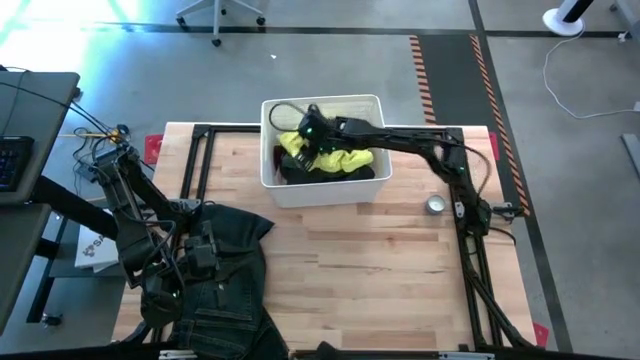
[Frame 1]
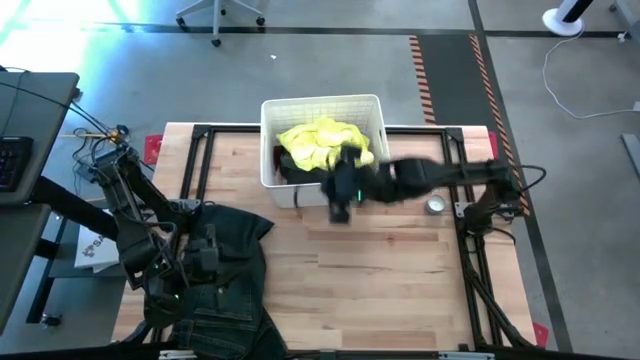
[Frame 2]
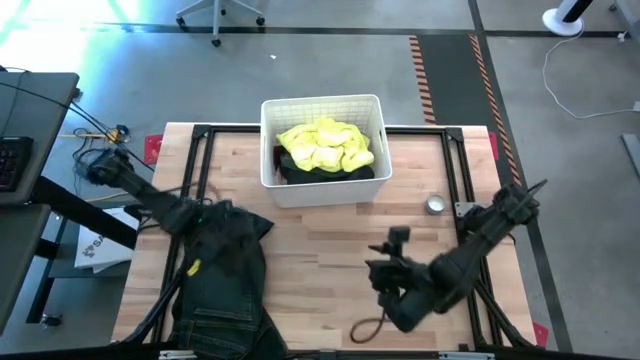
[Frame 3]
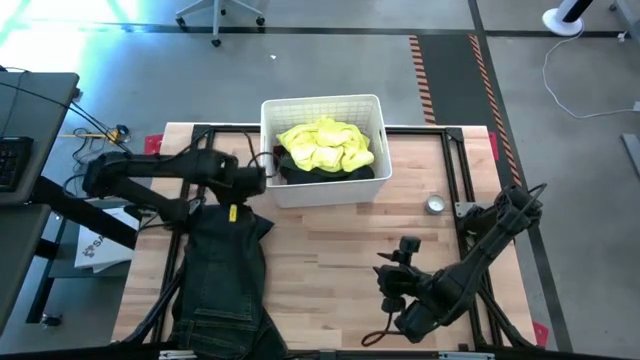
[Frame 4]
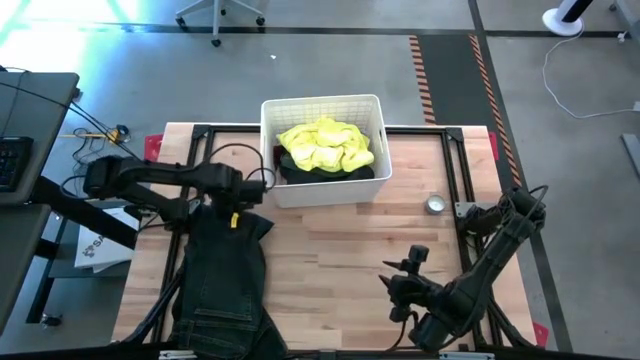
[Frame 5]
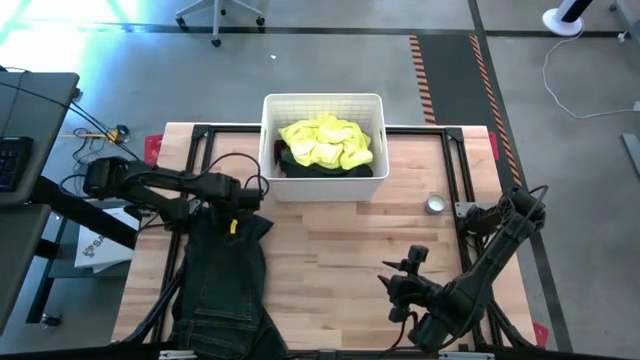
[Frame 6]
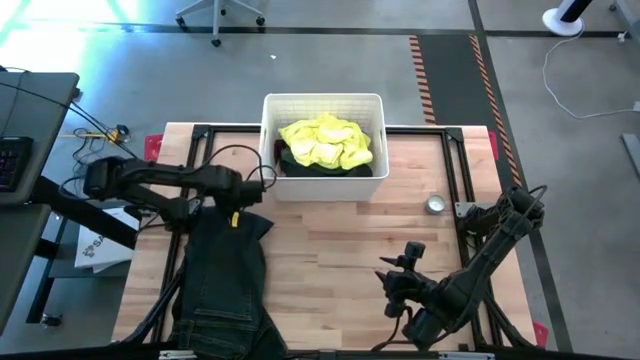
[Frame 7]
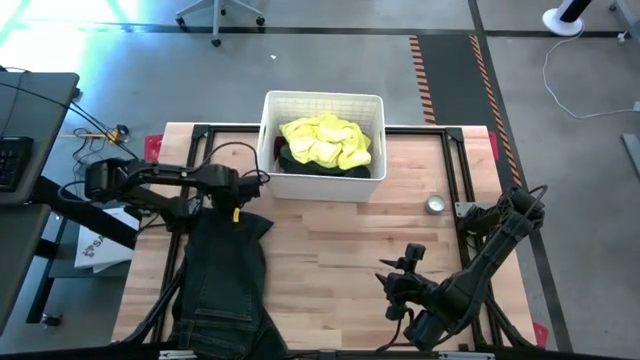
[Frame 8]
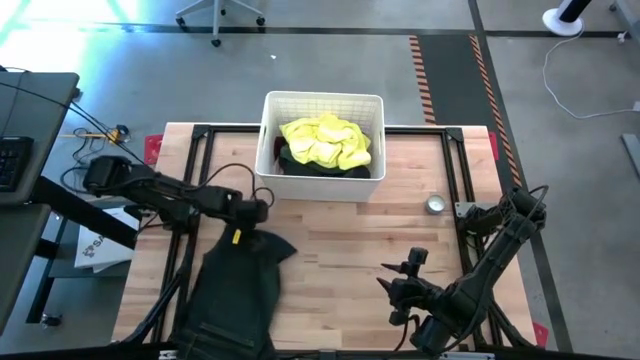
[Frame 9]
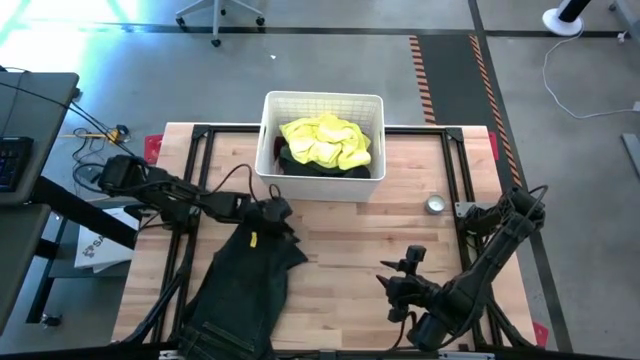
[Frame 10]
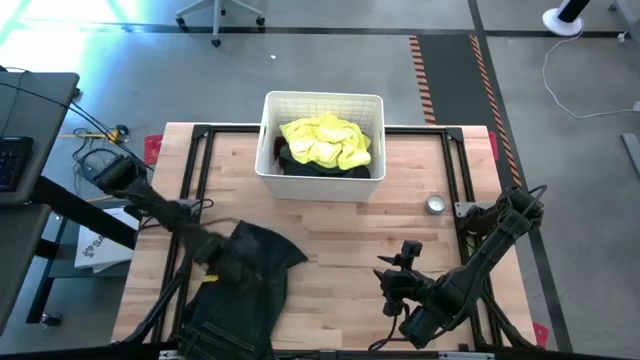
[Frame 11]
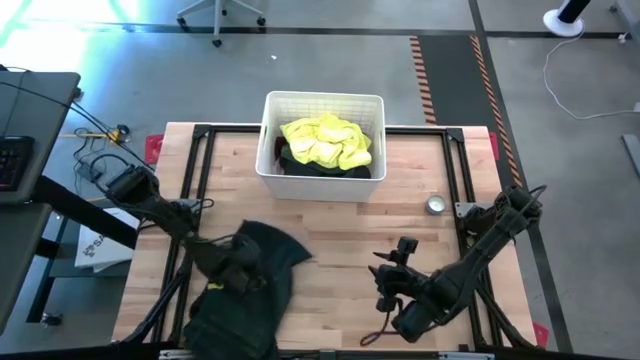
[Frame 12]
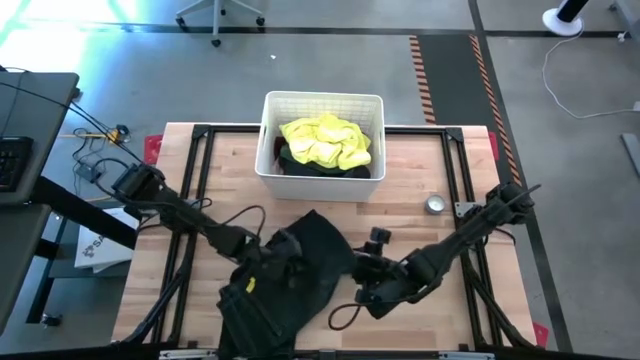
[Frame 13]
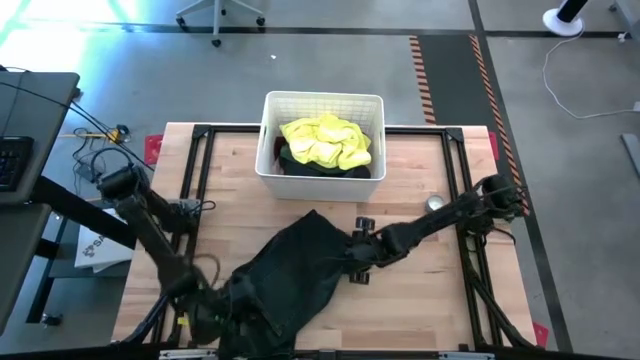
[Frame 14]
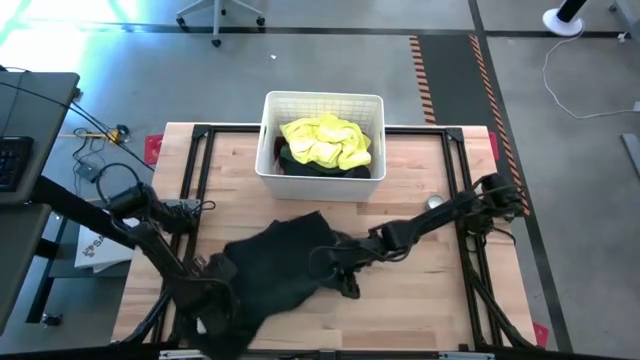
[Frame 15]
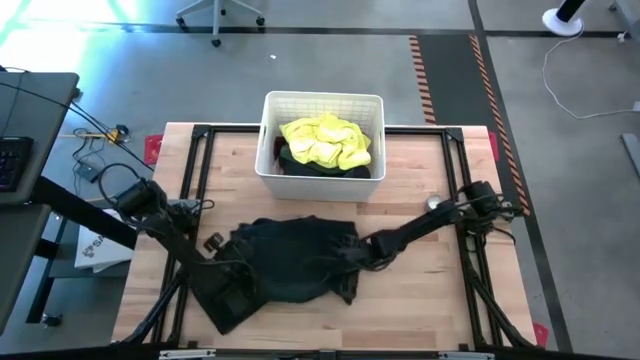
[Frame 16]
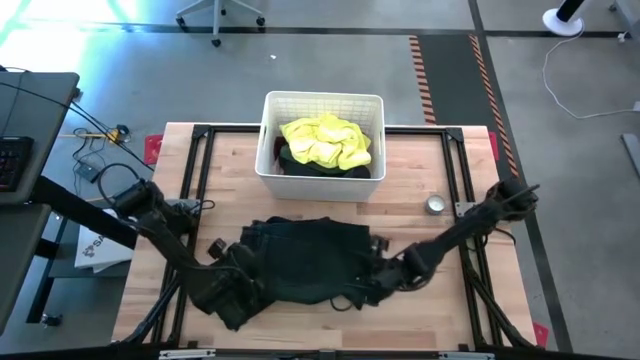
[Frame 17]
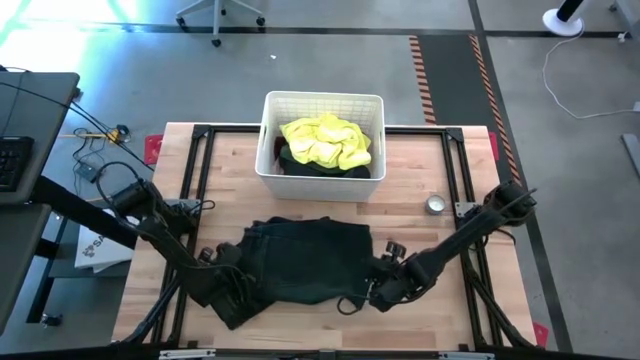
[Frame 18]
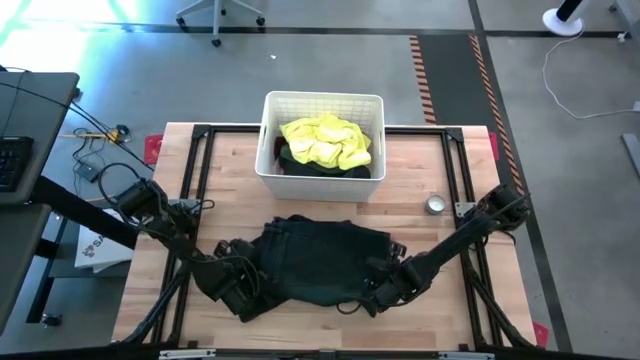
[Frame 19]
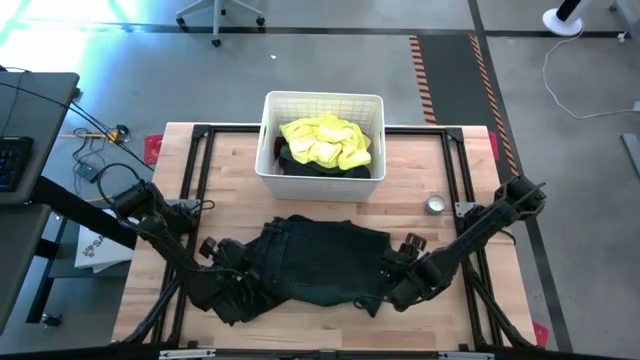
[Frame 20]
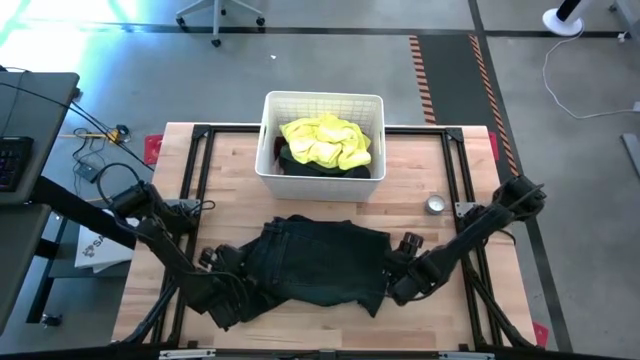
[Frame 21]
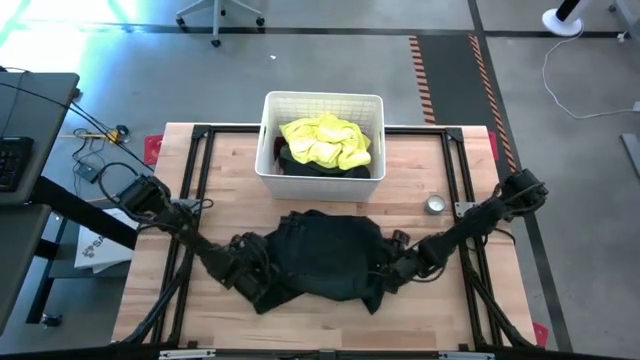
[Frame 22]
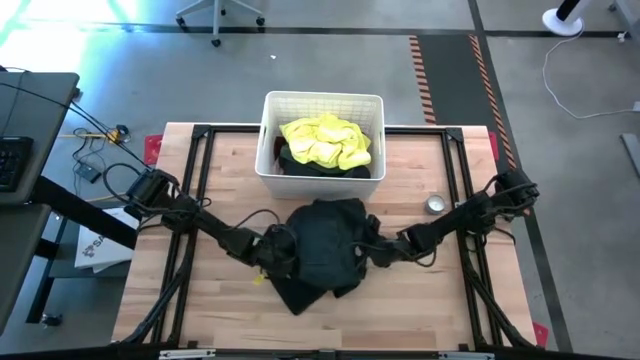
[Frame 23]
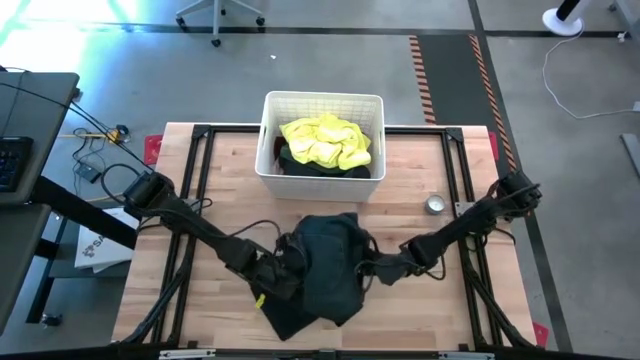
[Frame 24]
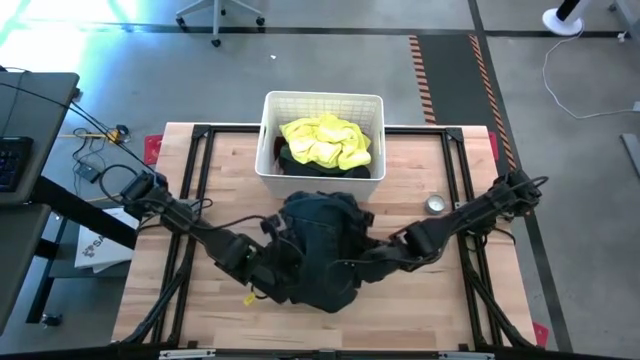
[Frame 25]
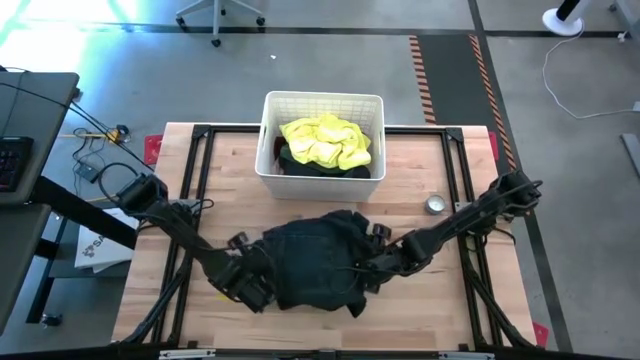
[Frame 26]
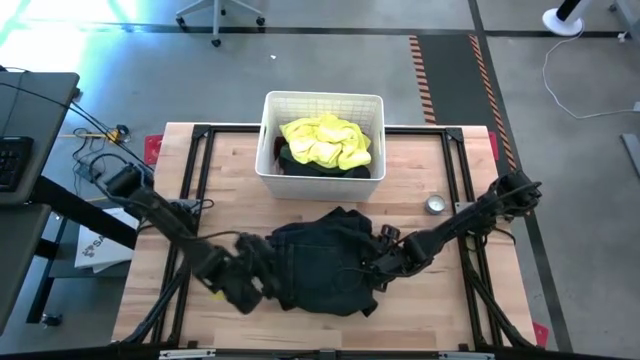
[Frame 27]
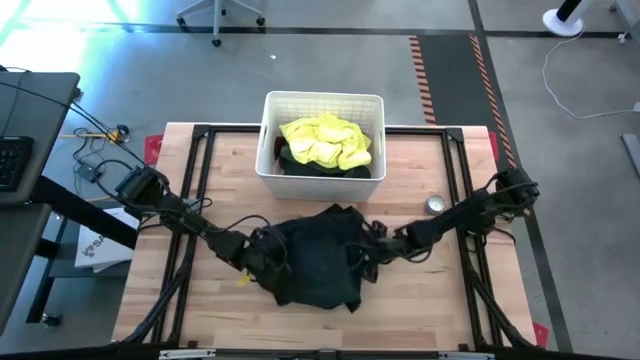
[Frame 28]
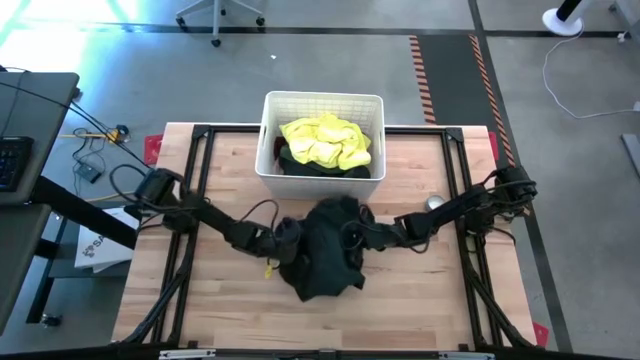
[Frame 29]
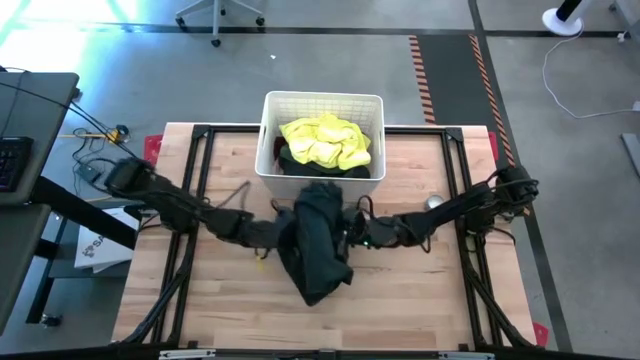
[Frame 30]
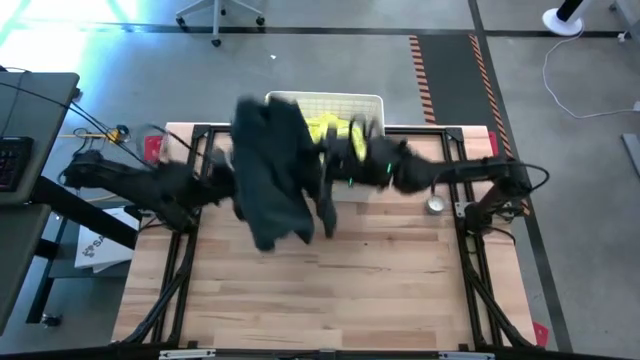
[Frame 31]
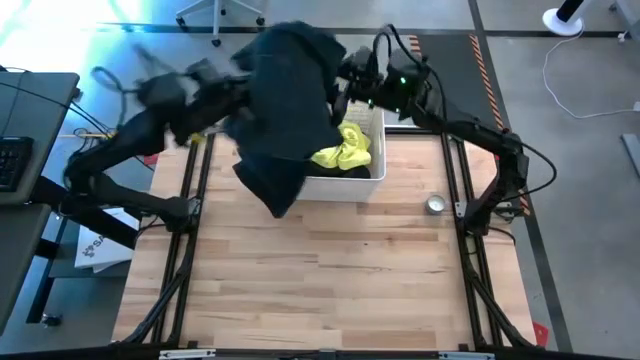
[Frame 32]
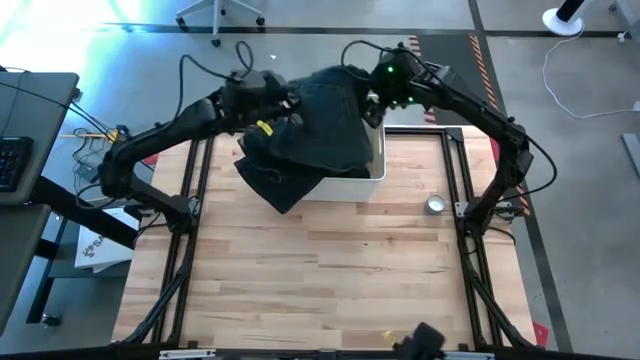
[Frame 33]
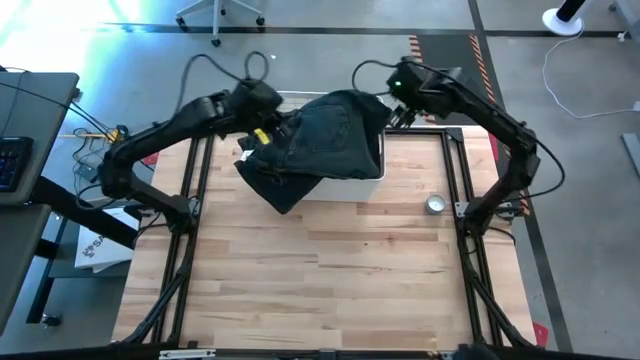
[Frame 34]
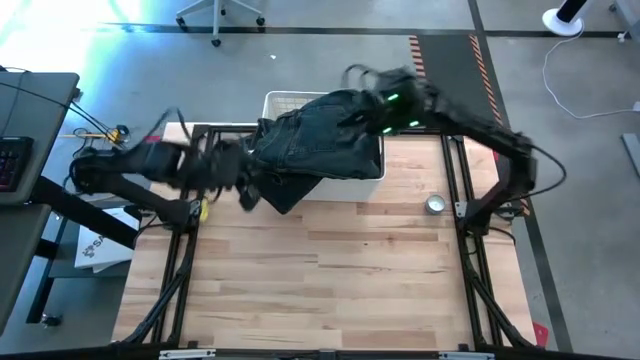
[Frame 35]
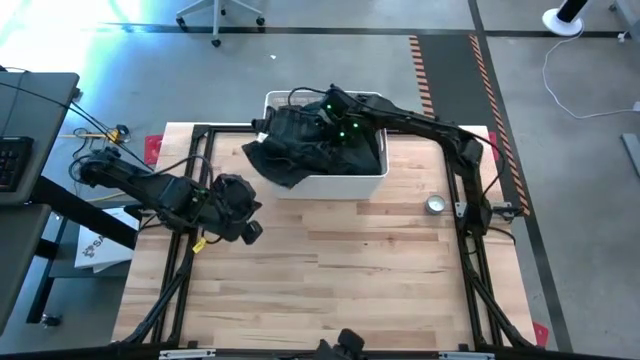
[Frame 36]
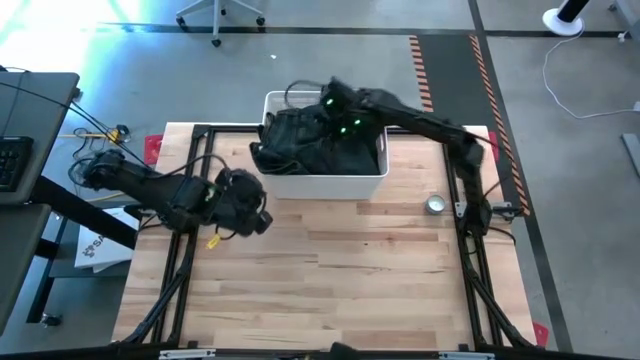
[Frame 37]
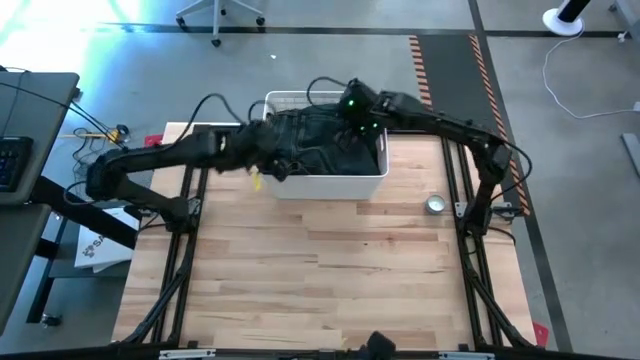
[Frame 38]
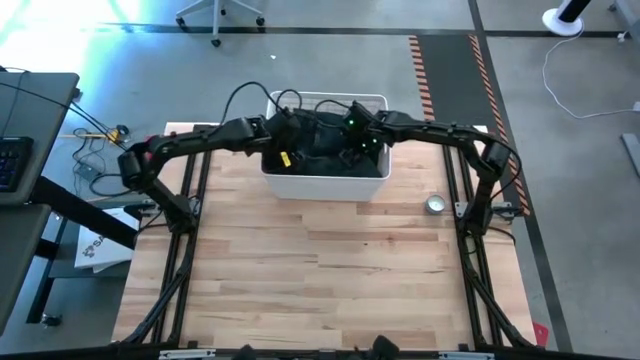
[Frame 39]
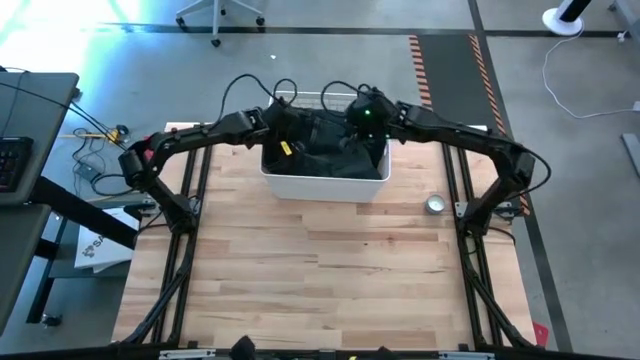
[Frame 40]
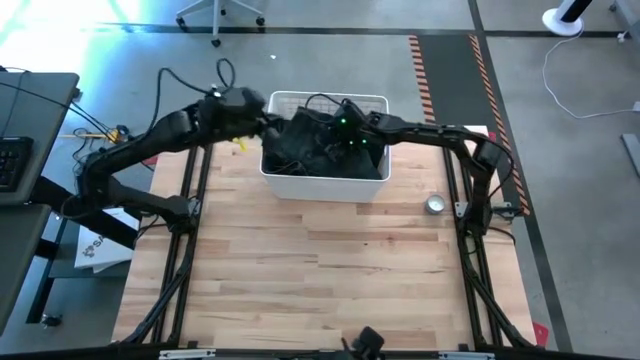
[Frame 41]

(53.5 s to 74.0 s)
Task: Sort clothes
Put the dark blue pants into the white laundry bin
